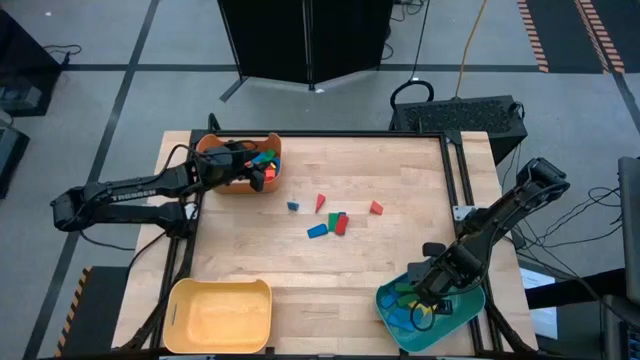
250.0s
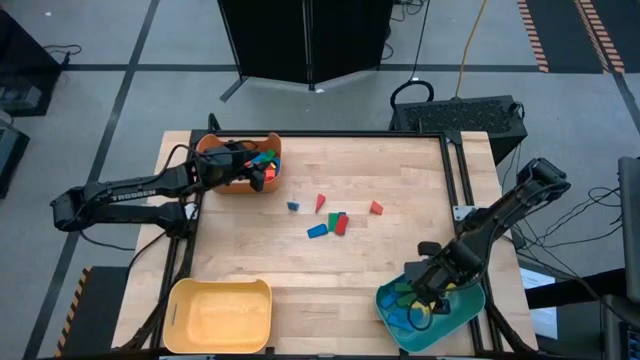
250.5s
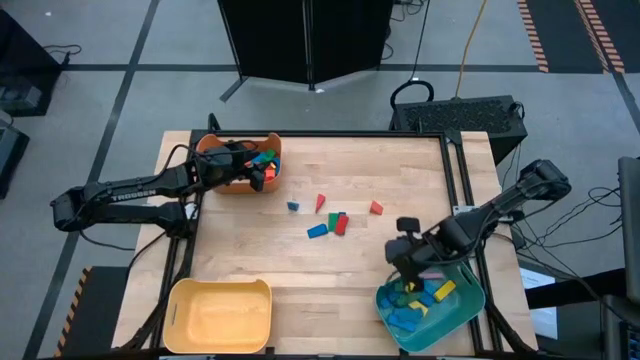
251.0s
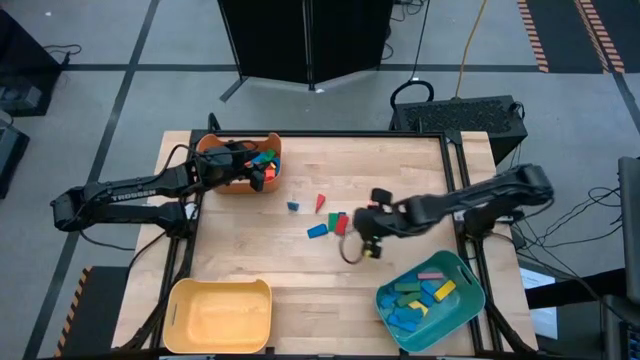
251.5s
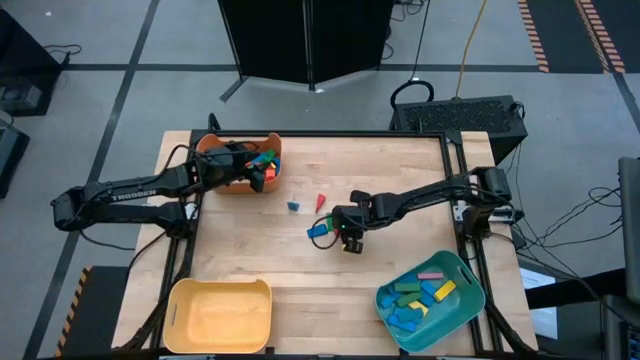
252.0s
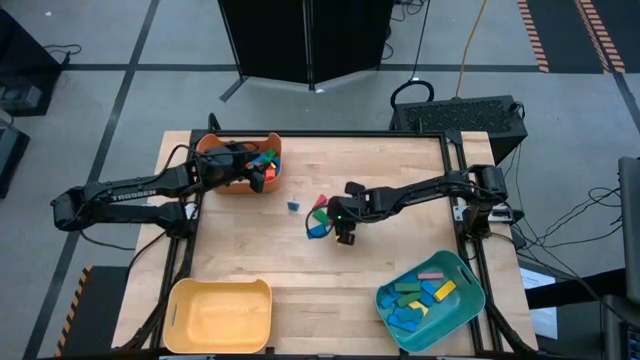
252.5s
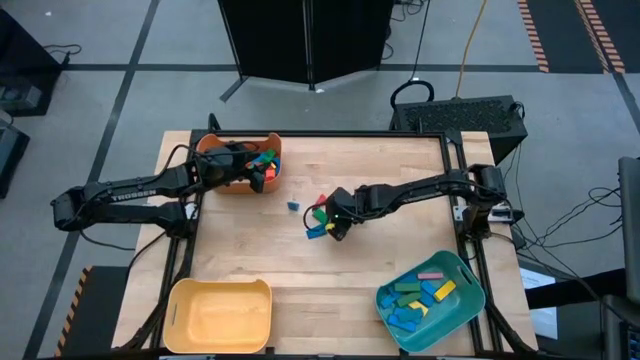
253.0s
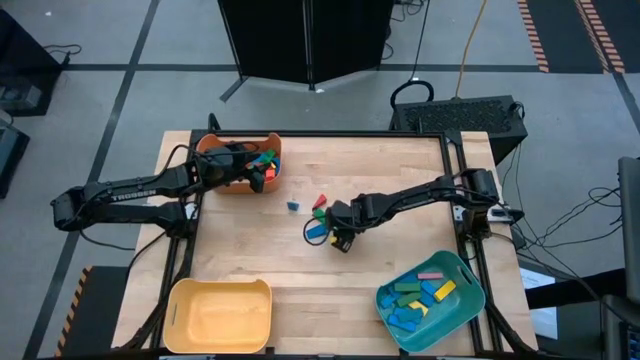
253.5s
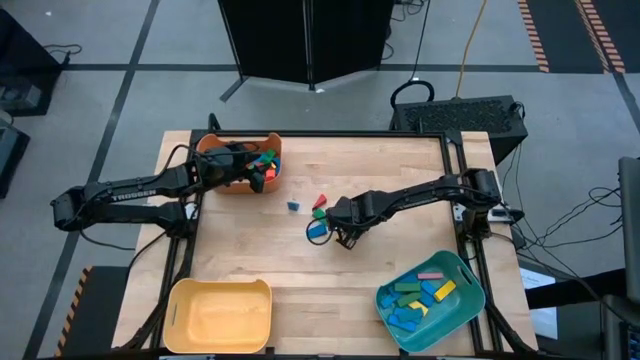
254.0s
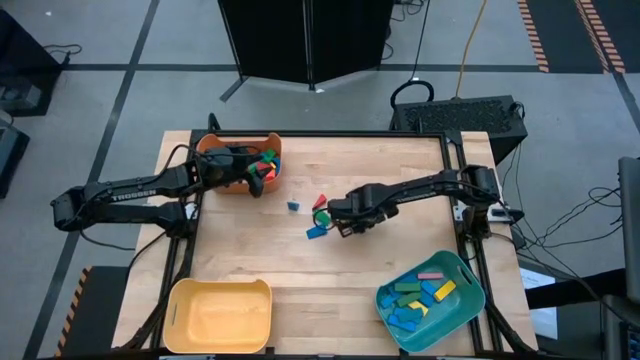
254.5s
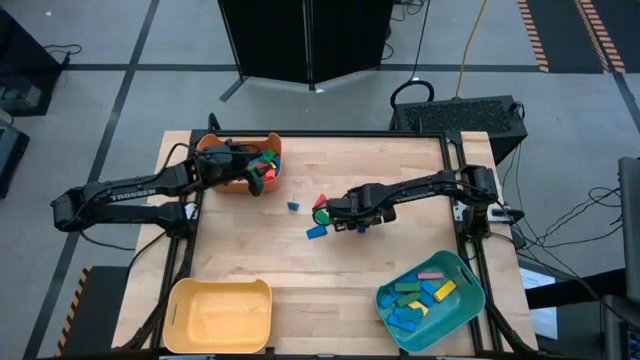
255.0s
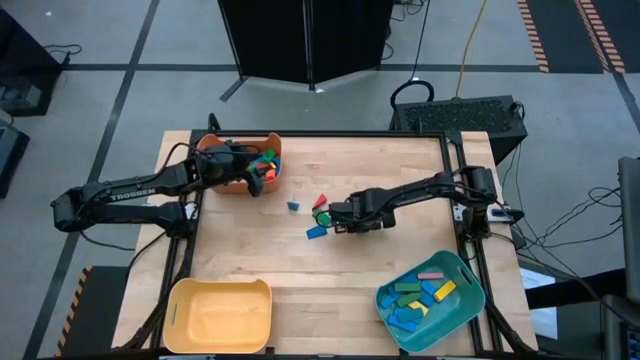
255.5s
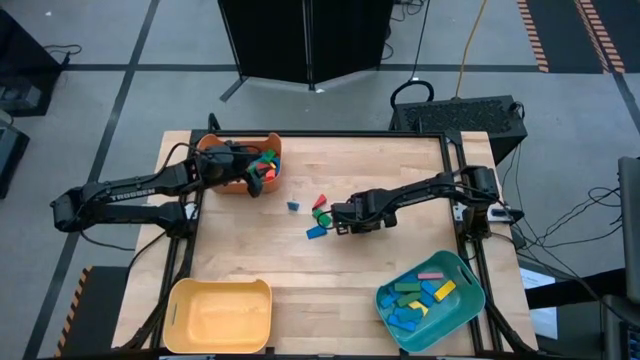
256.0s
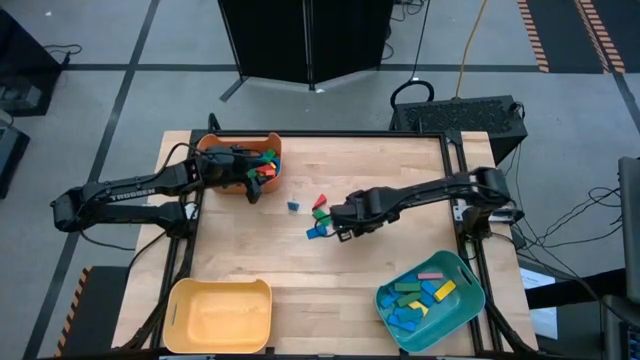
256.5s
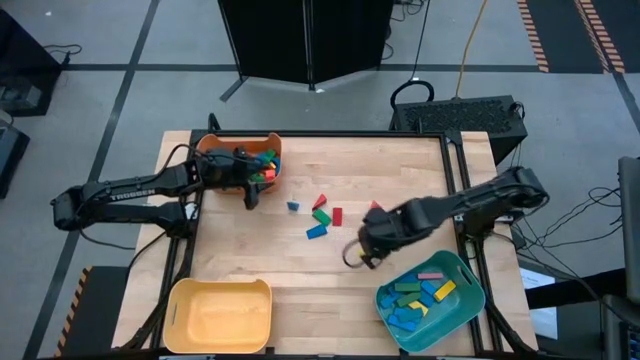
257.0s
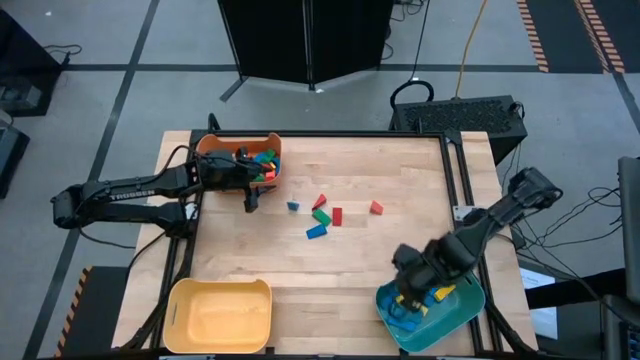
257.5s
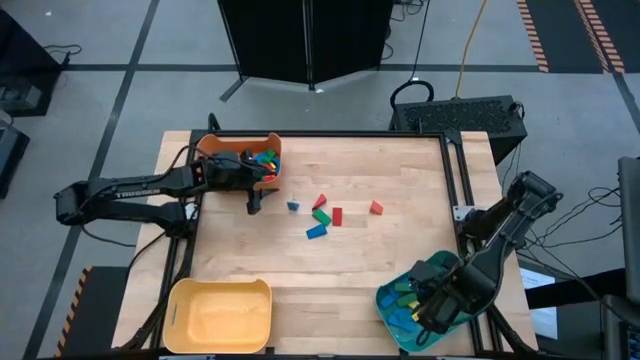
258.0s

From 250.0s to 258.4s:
Task: Sort blocks by size
Put the blue rectangular block into the blue bin

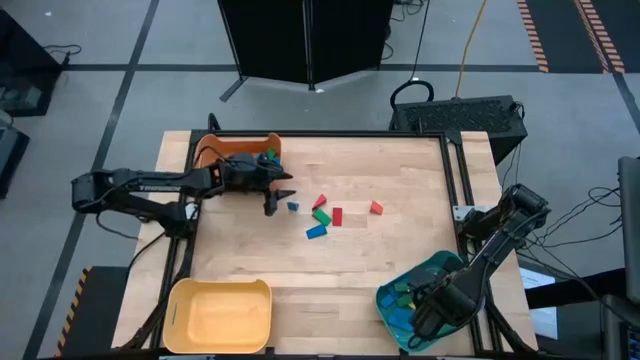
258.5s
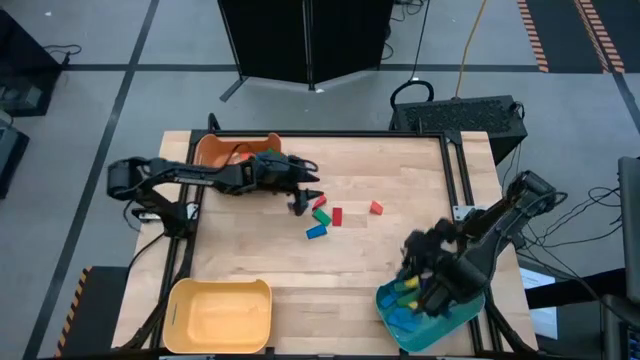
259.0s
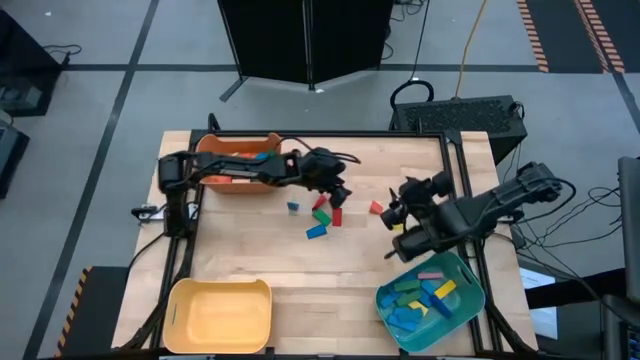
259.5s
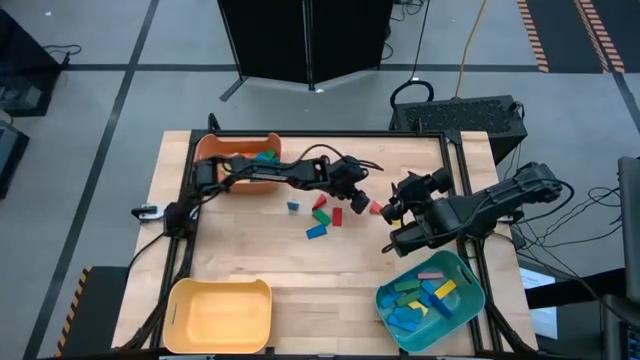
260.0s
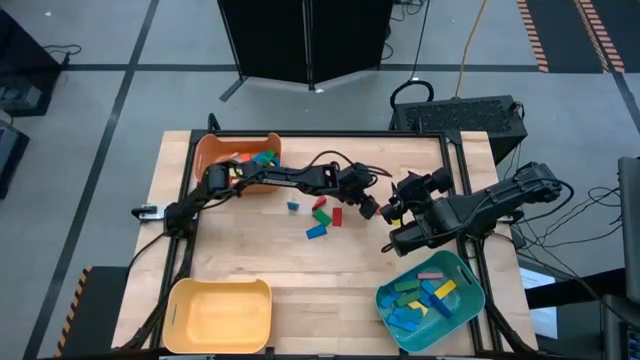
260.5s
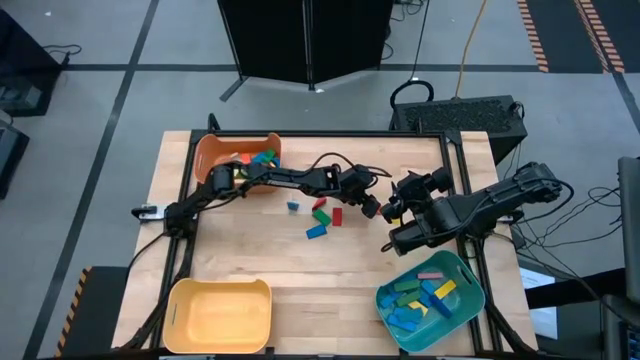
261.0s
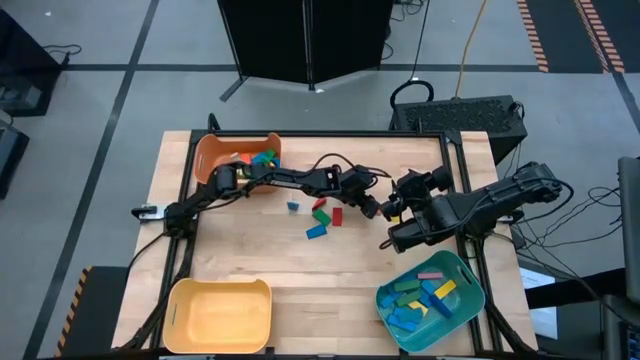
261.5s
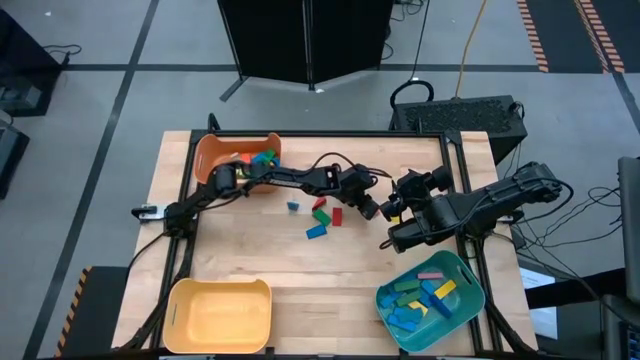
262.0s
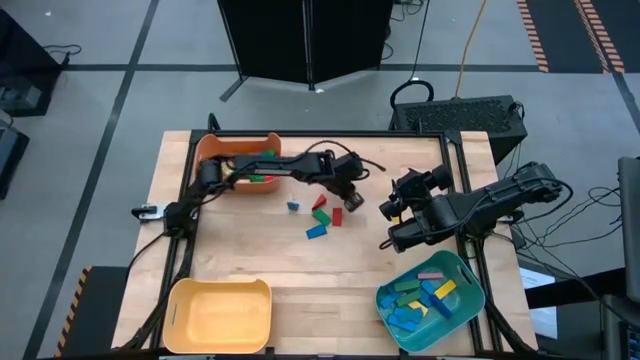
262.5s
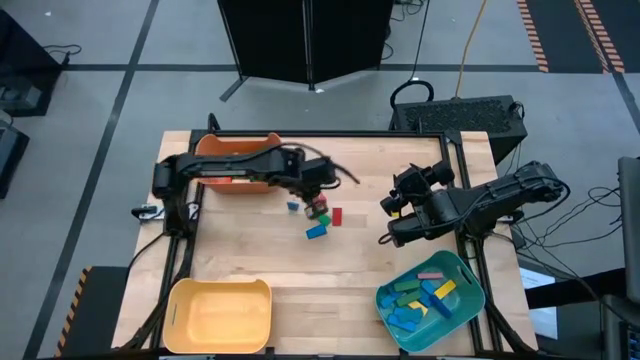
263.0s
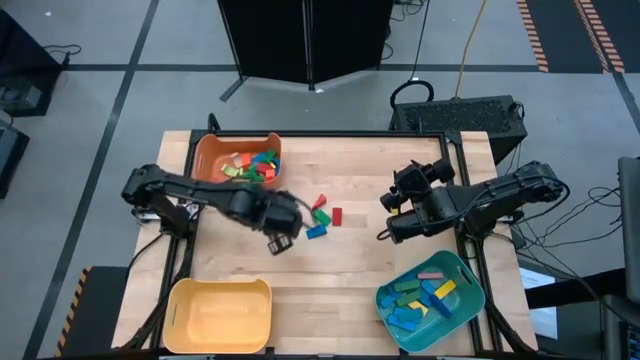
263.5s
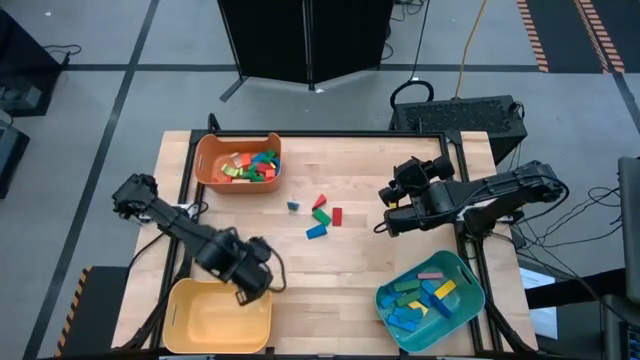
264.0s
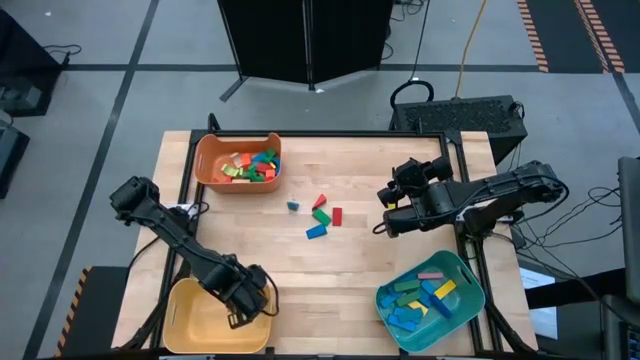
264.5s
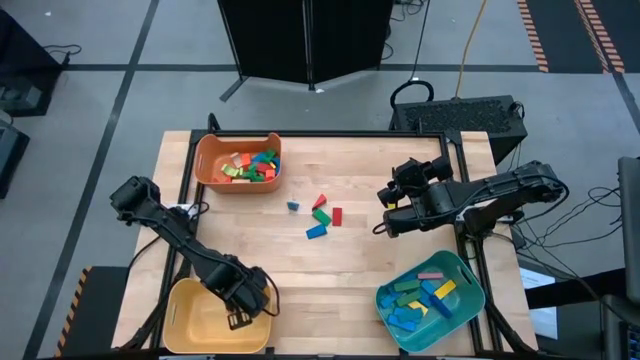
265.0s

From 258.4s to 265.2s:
Put the orange triangular block into the yellow bin

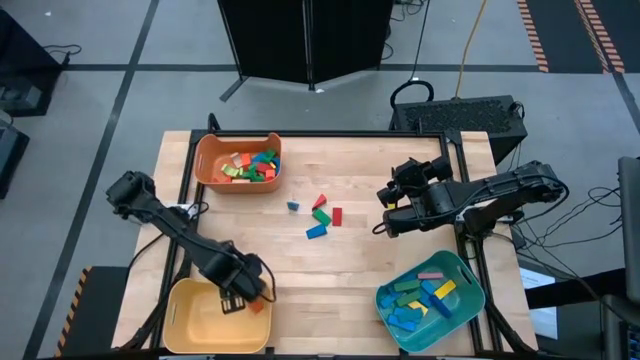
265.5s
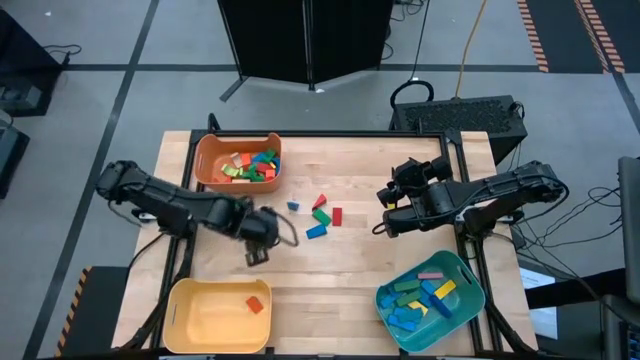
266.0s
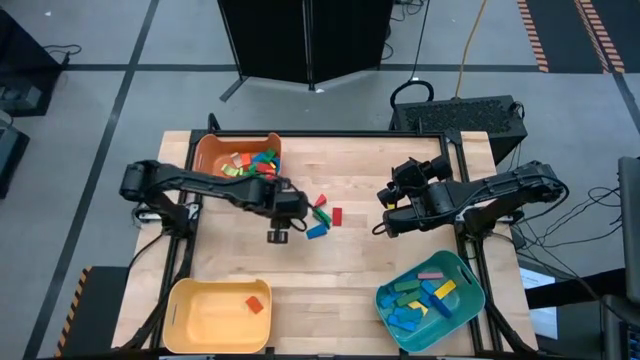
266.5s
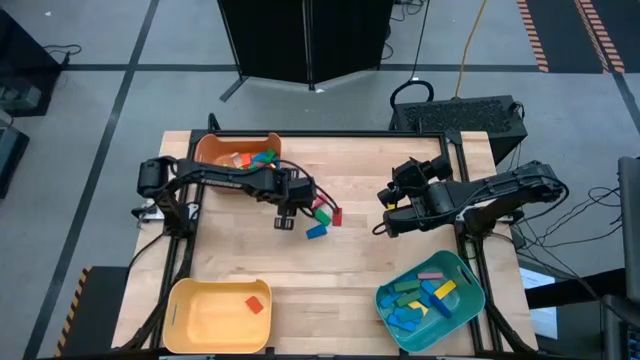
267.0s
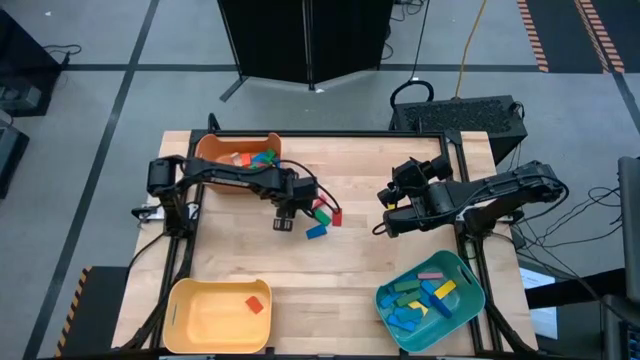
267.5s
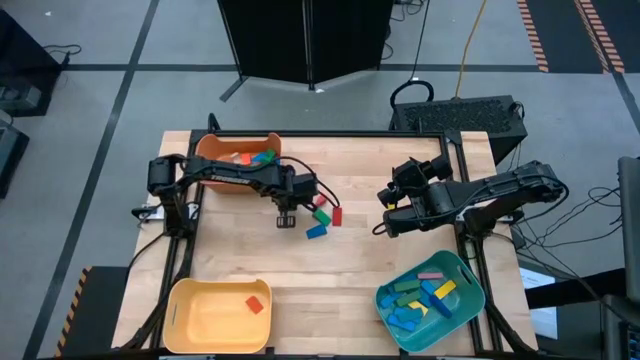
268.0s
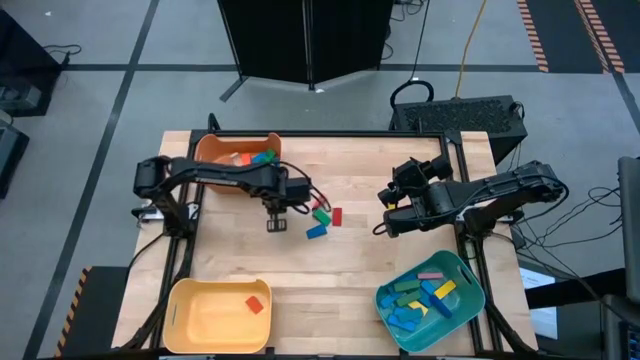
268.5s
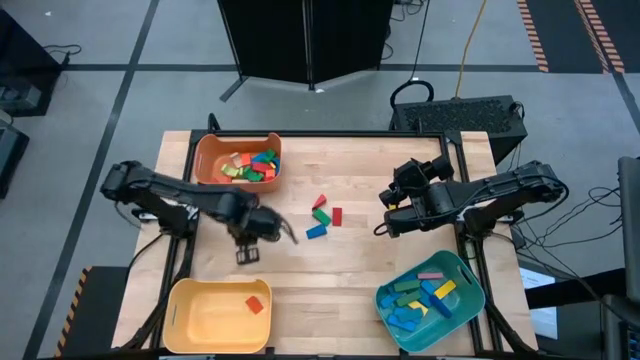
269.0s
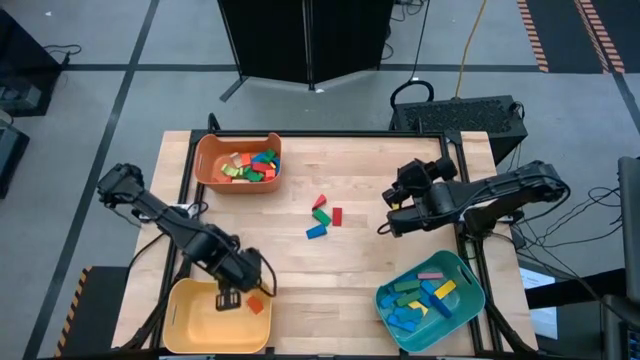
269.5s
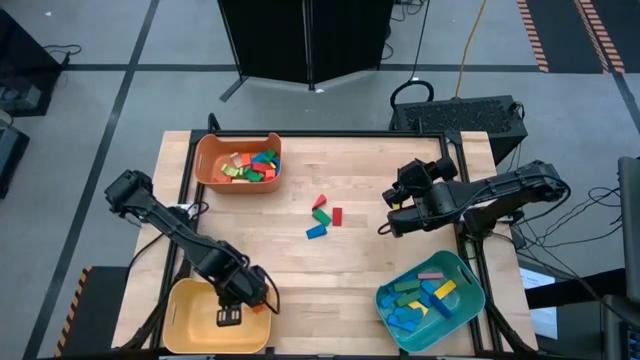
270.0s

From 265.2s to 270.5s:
Put the blue triangular block into the yellow bin
